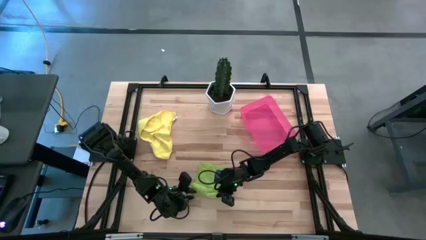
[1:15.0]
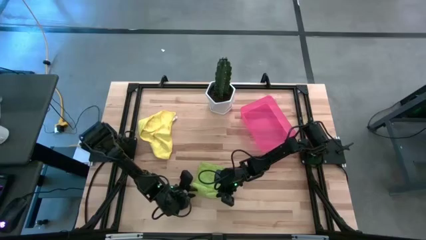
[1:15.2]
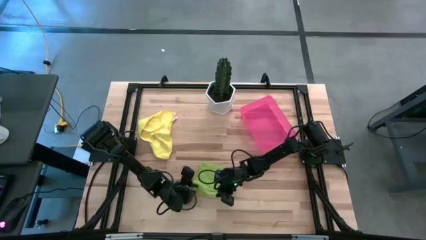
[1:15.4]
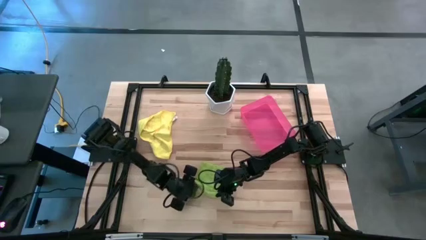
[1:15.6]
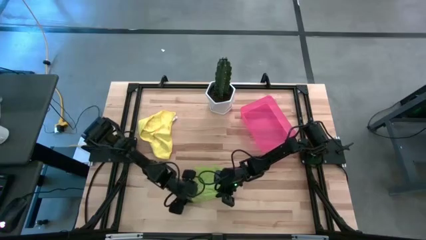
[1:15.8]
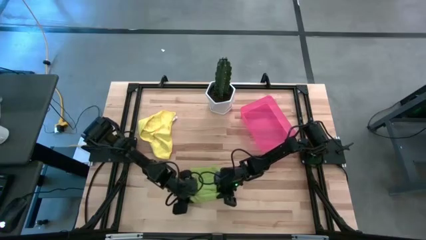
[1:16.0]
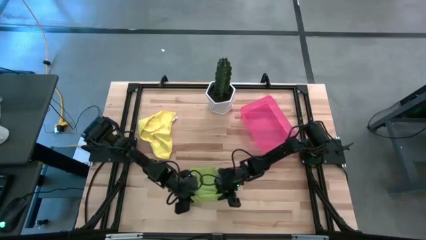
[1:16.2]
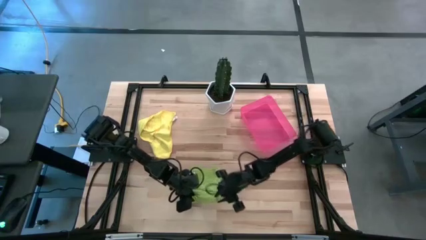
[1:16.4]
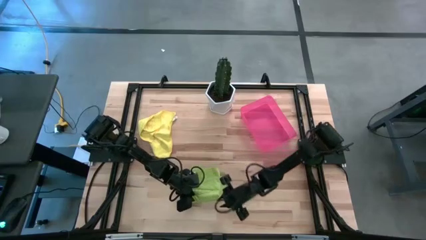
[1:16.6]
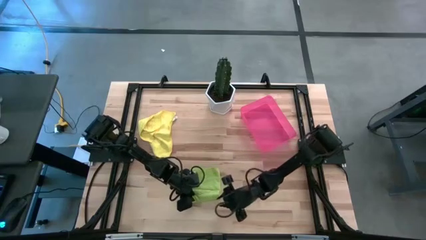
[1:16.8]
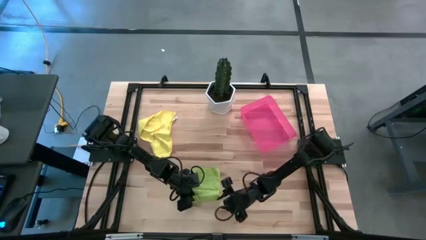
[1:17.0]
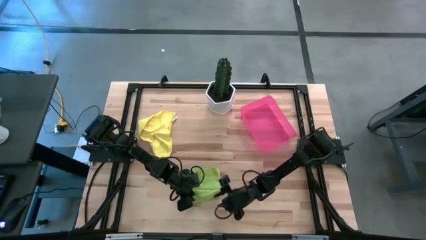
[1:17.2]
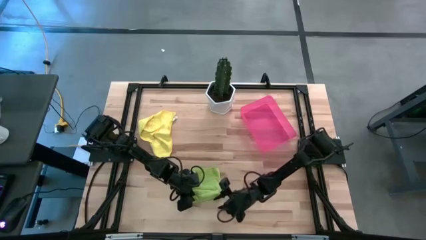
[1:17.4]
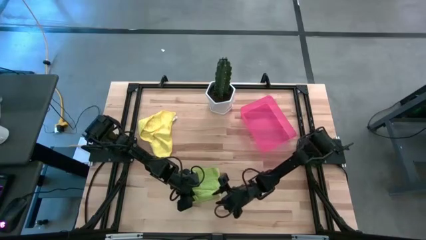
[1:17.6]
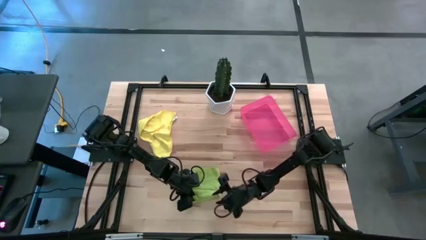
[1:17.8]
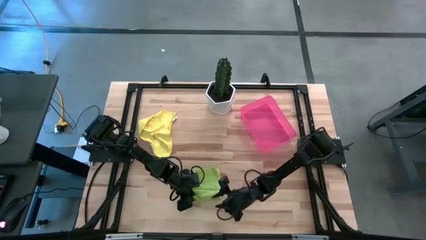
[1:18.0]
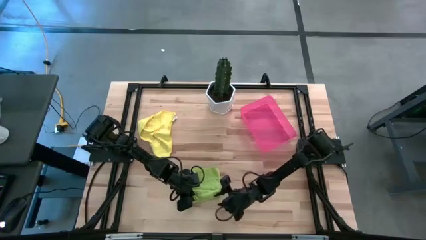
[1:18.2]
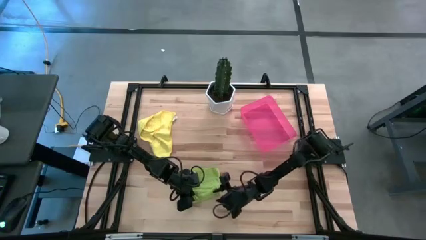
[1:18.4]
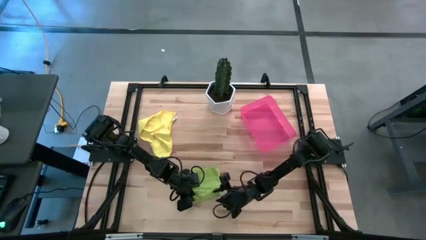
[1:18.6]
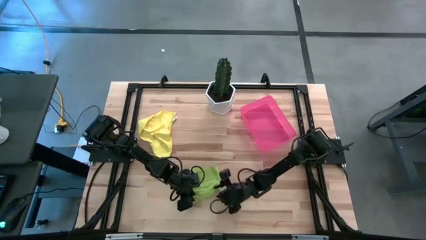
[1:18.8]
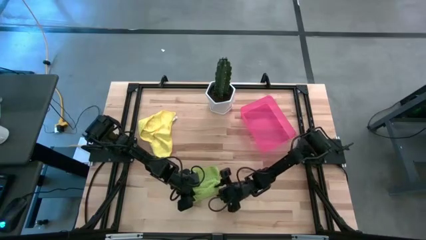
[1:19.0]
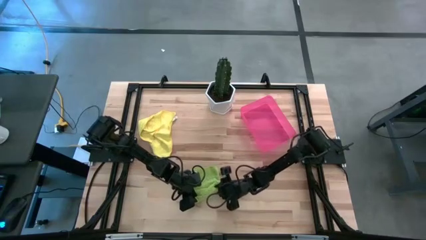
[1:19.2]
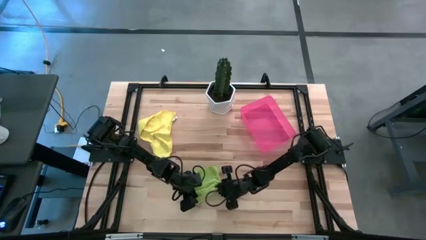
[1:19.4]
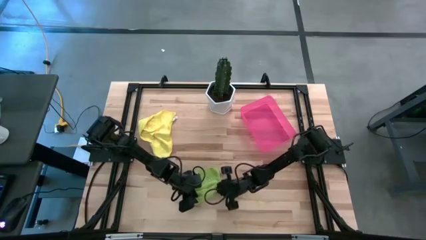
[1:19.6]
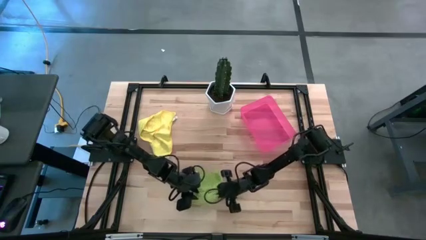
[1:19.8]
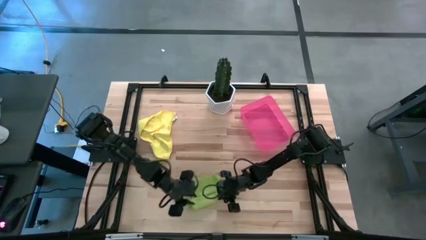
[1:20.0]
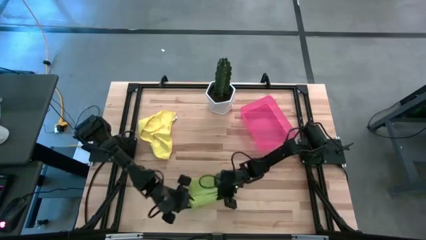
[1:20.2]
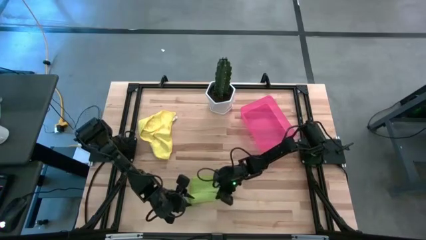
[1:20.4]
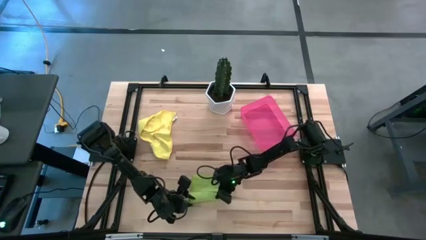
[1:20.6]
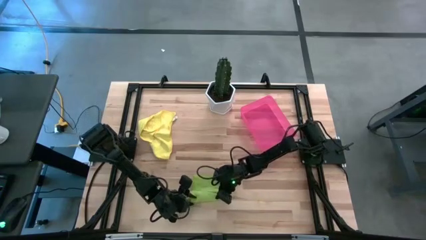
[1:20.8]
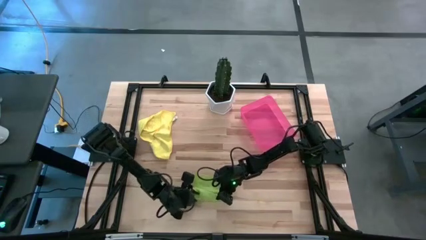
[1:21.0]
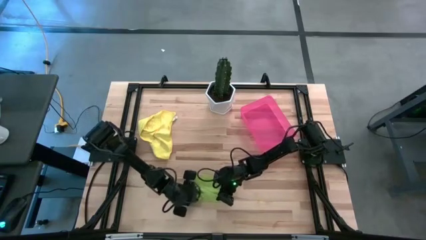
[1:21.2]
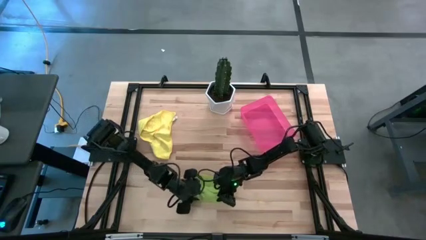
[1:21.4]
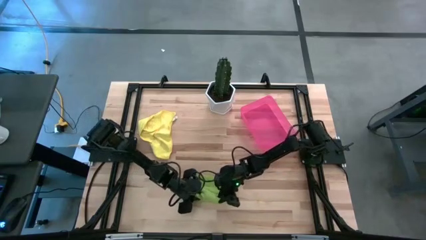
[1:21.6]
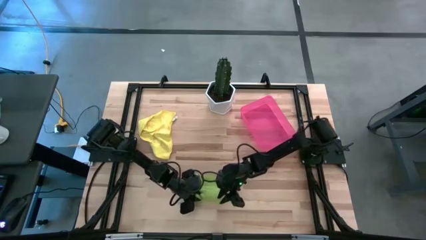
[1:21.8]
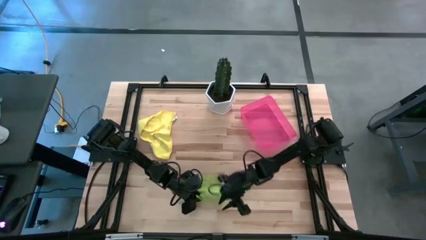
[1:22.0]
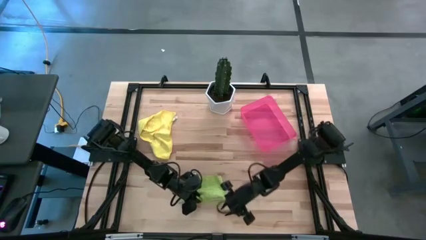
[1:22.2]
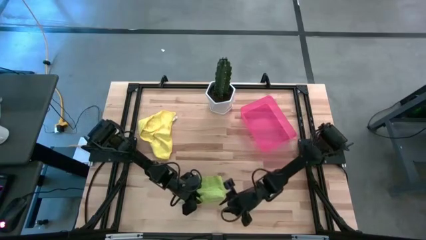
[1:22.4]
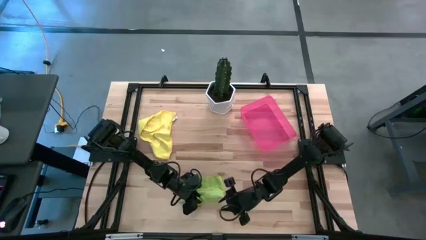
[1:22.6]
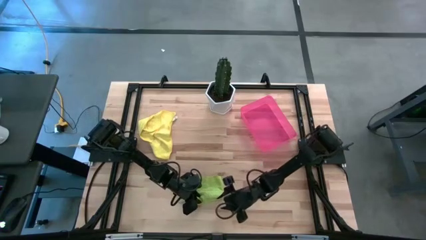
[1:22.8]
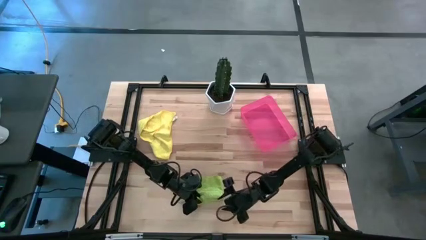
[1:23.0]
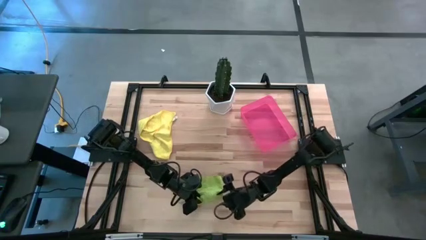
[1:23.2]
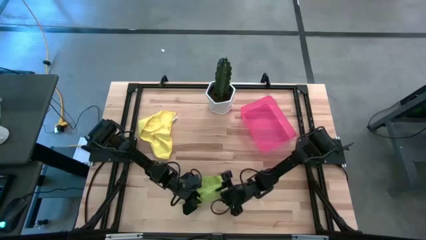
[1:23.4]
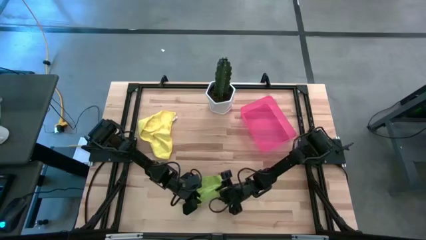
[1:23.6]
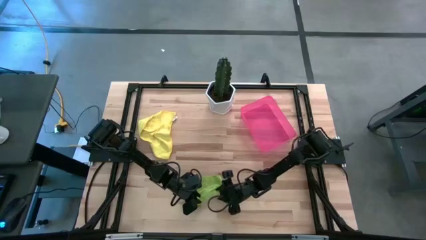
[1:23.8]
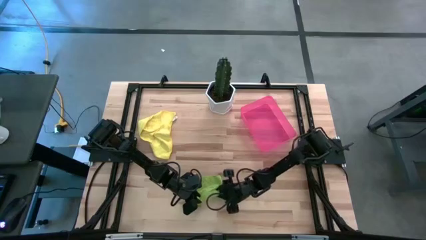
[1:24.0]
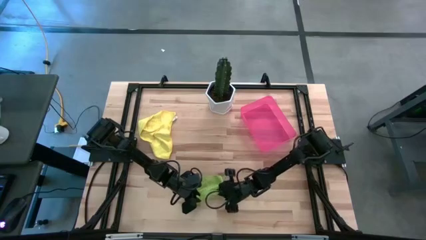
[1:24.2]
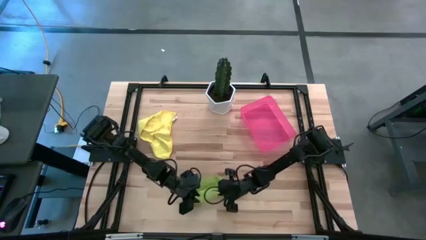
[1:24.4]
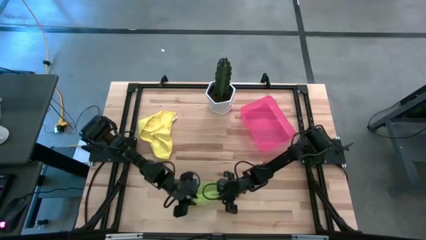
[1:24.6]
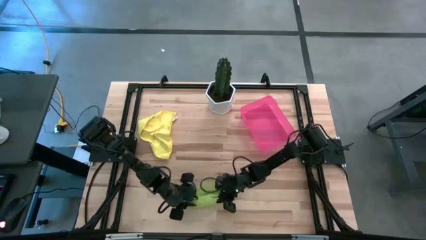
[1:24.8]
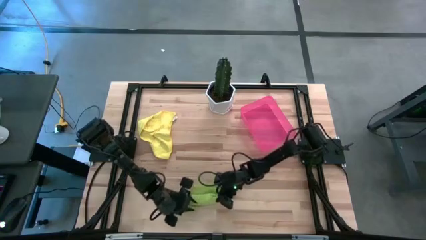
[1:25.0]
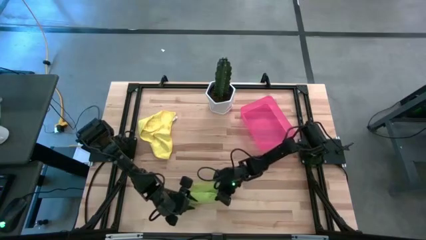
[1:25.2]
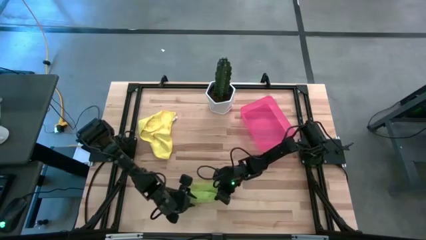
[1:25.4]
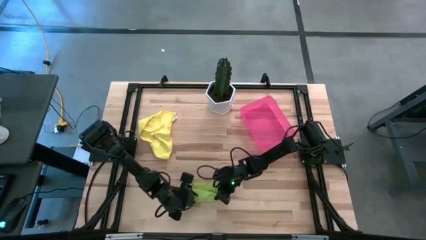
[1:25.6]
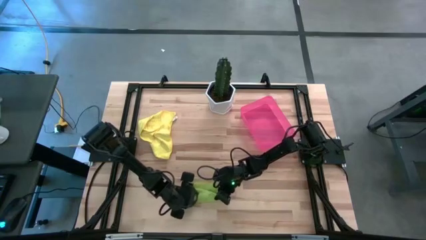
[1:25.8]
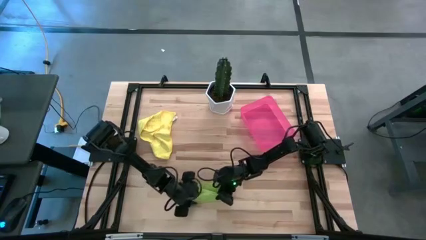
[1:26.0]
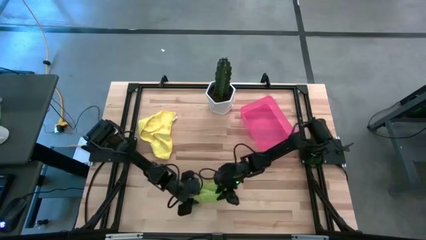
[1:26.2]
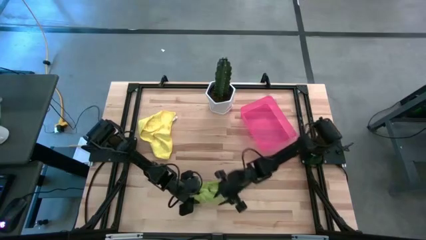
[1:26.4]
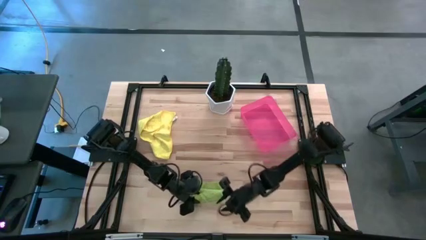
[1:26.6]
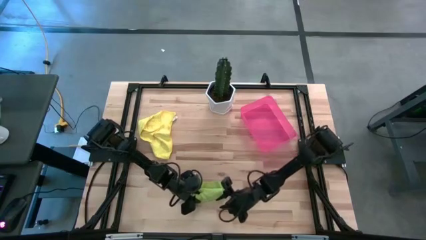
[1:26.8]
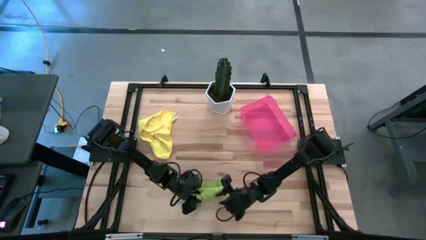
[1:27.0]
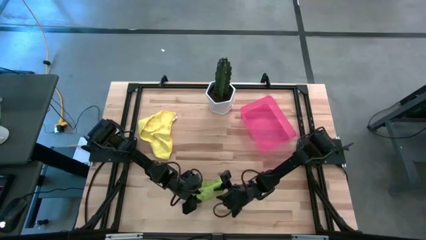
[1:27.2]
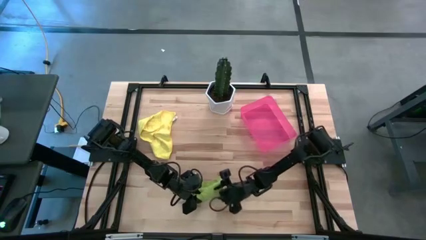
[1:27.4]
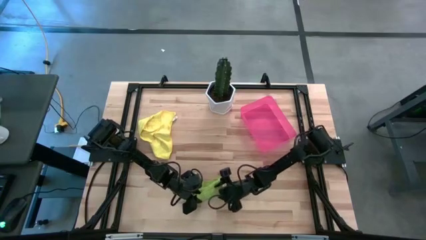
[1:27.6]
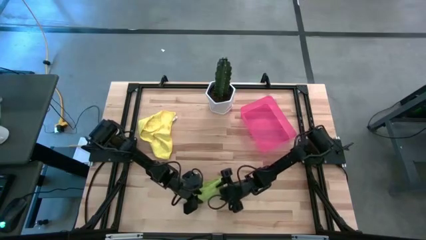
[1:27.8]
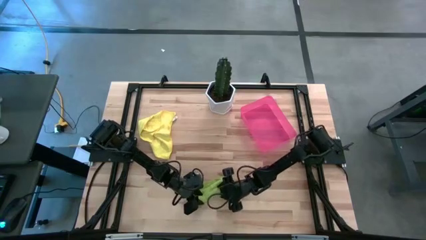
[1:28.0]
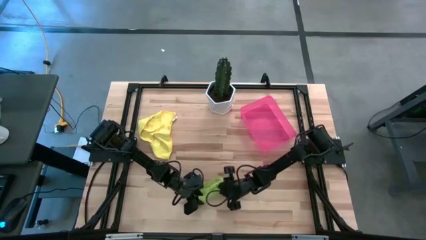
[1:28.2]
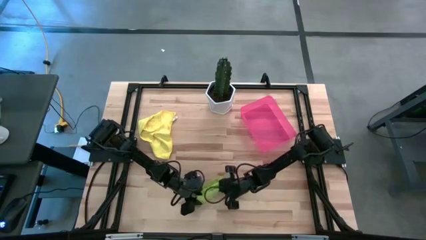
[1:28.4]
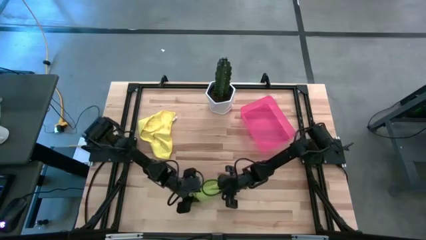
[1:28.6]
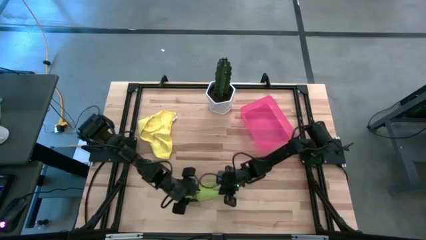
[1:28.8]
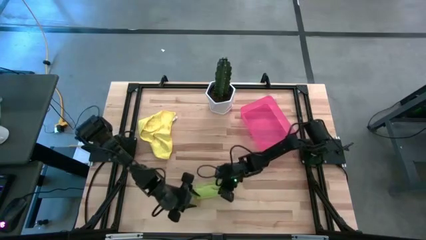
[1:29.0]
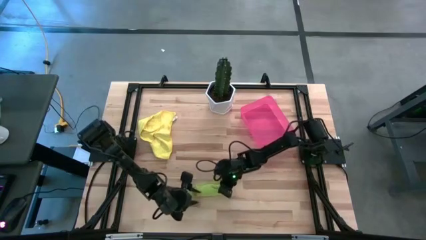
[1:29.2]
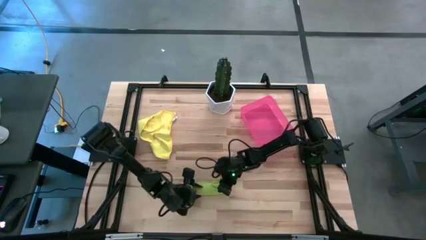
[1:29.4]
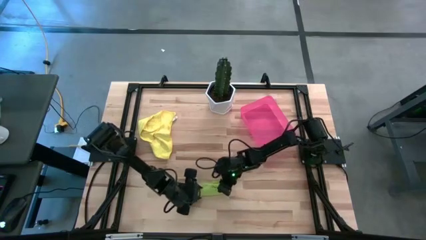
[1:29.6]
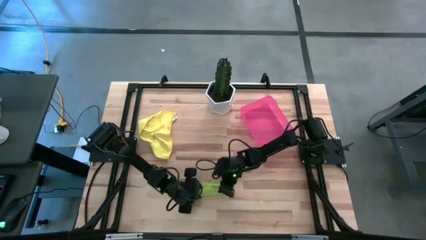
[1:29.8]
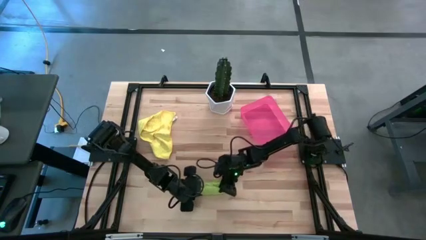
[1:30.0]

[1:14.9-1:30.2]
Task: Roll microfiber towels into tight, uniform cylinder then place into a basket
Roll the green towel
